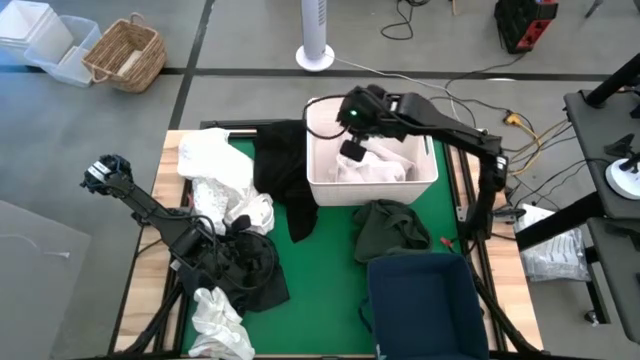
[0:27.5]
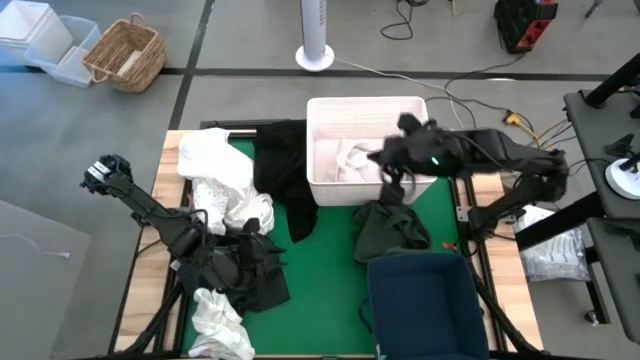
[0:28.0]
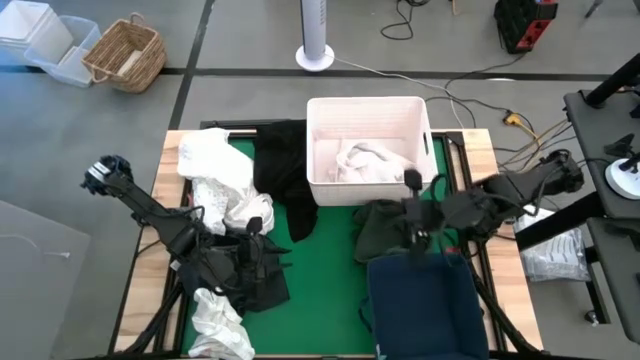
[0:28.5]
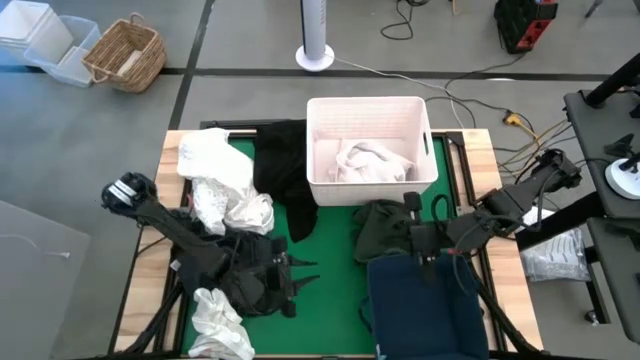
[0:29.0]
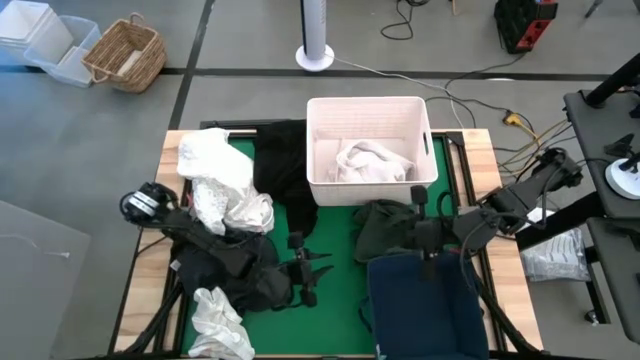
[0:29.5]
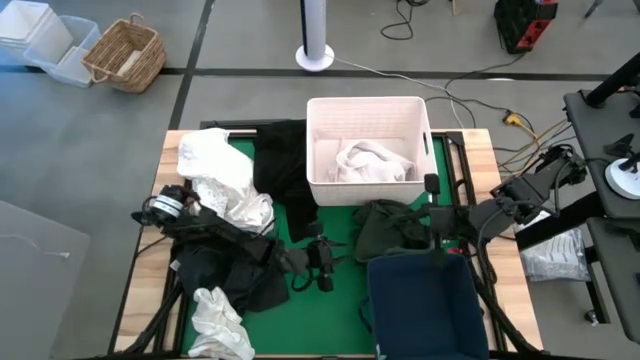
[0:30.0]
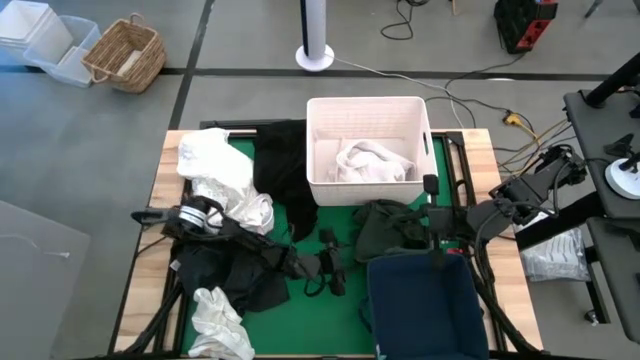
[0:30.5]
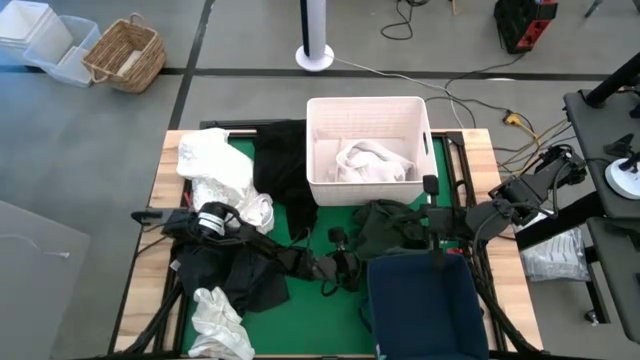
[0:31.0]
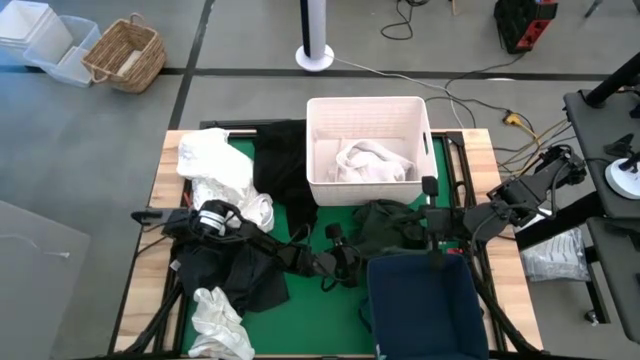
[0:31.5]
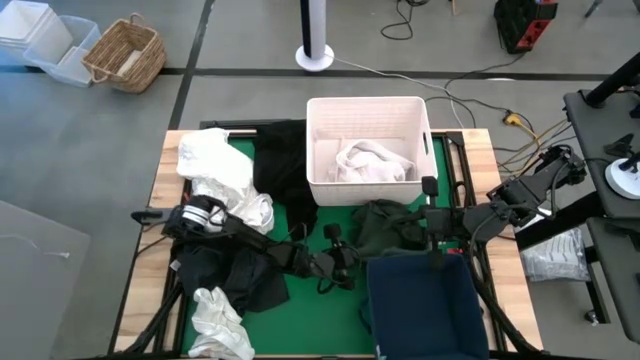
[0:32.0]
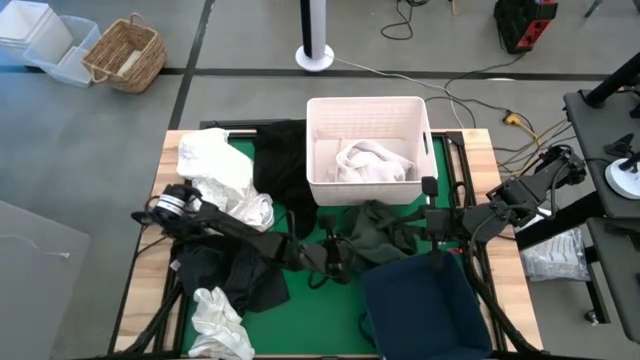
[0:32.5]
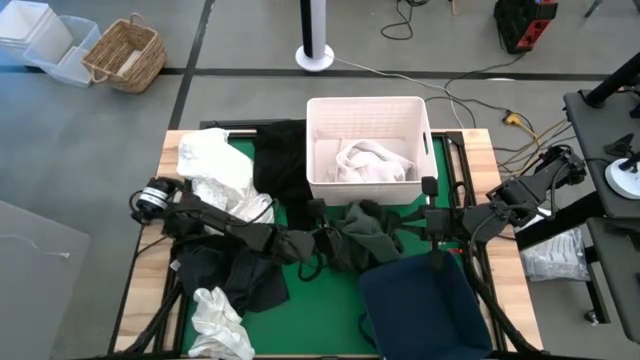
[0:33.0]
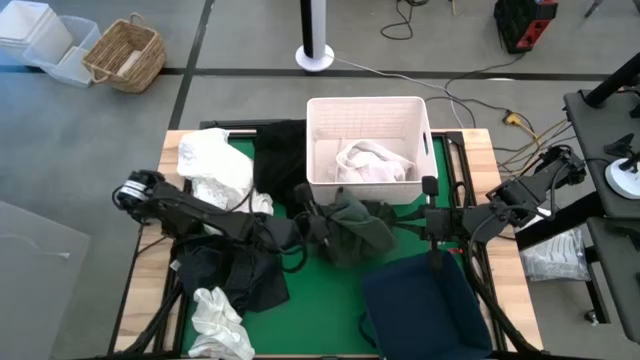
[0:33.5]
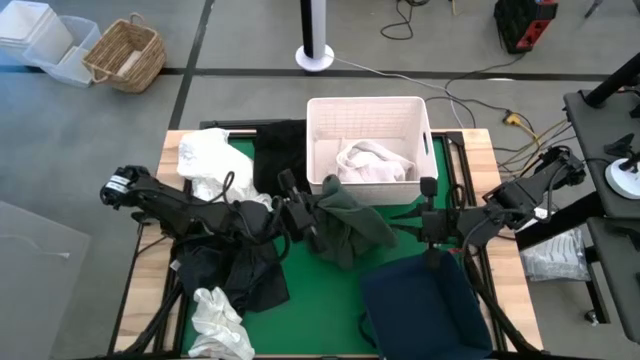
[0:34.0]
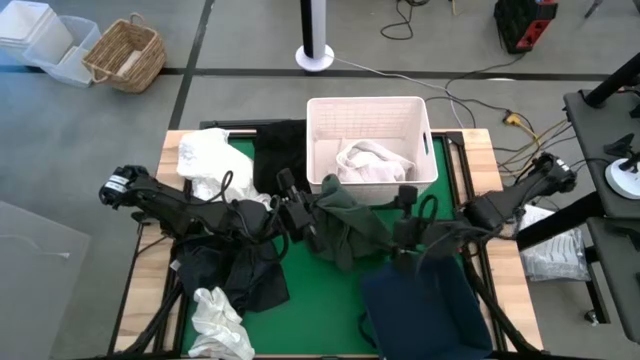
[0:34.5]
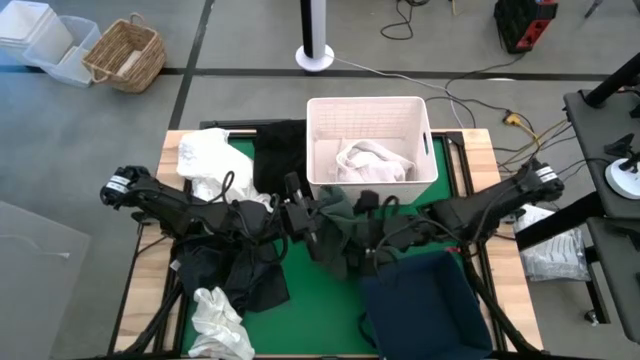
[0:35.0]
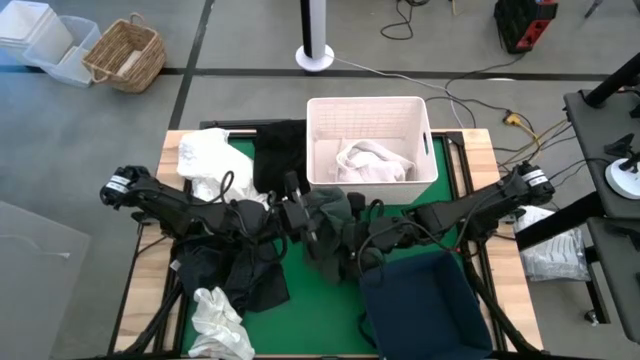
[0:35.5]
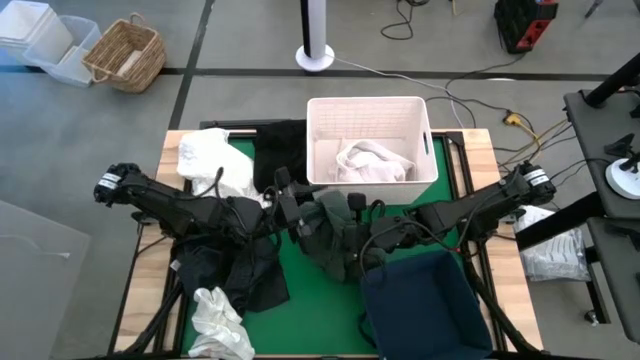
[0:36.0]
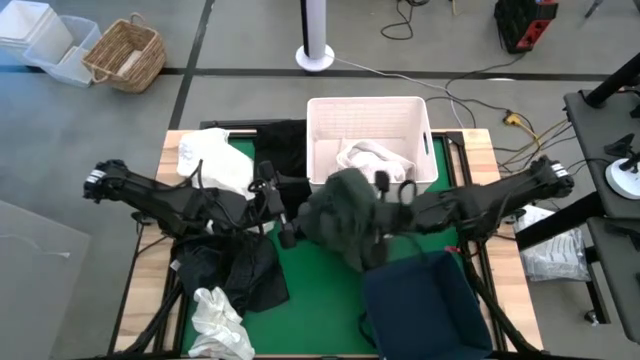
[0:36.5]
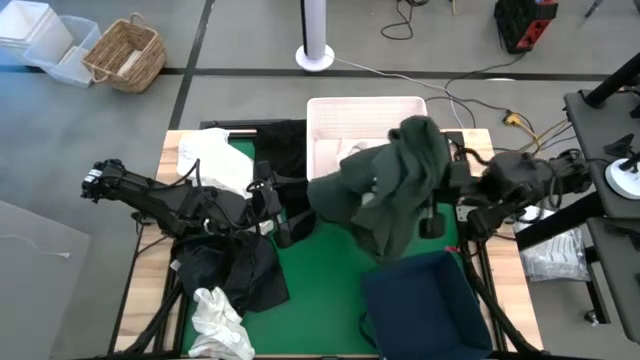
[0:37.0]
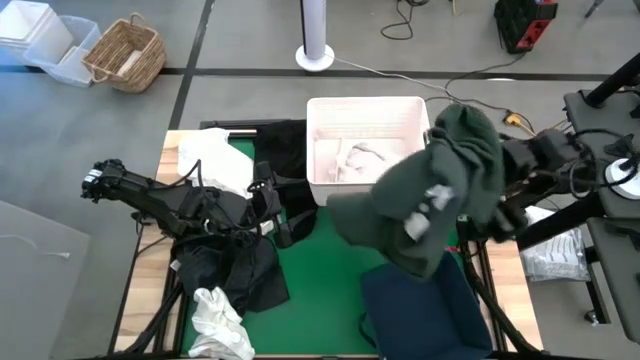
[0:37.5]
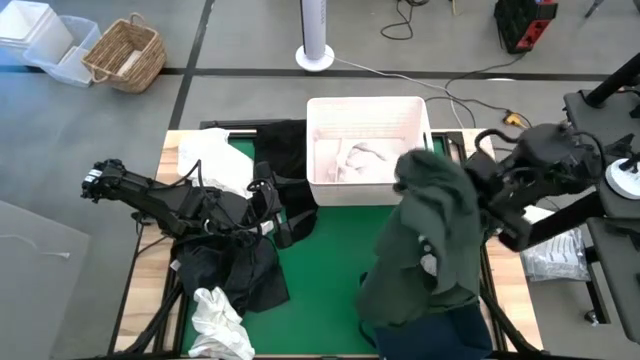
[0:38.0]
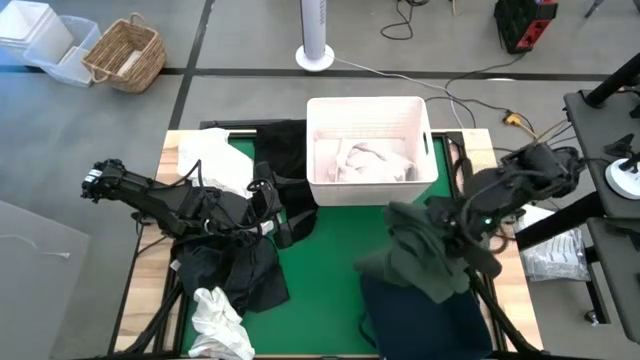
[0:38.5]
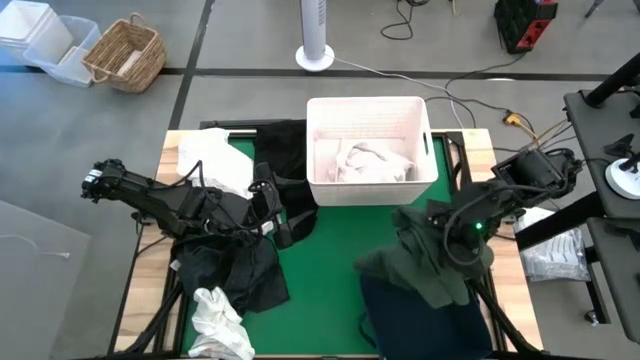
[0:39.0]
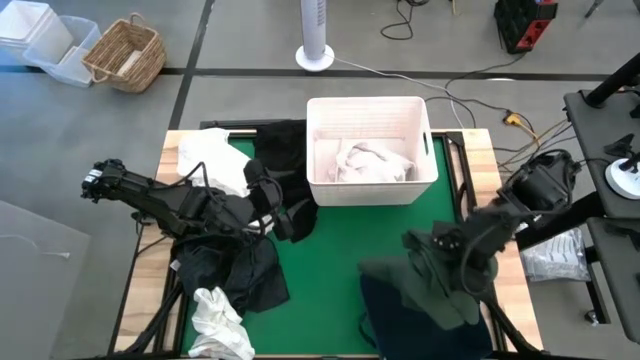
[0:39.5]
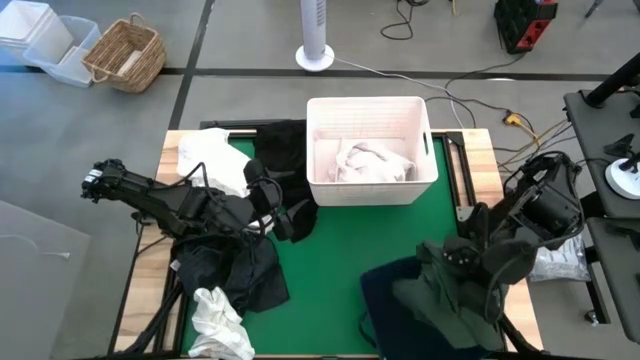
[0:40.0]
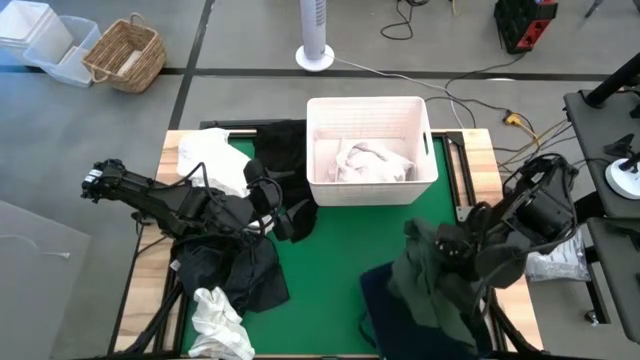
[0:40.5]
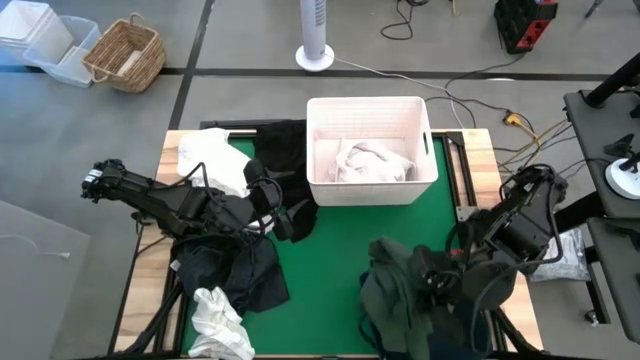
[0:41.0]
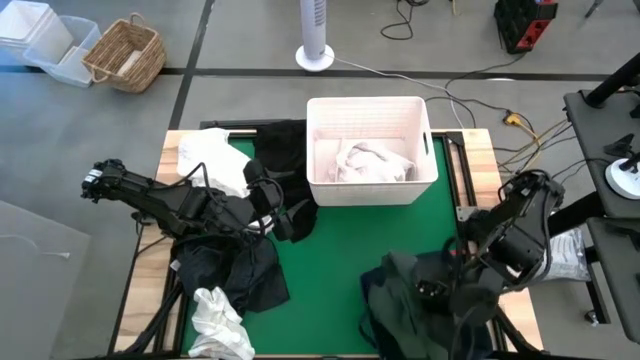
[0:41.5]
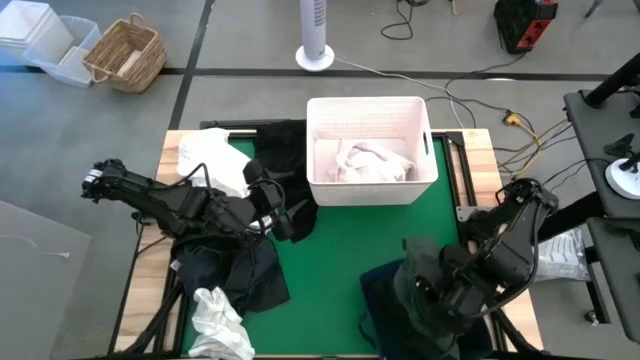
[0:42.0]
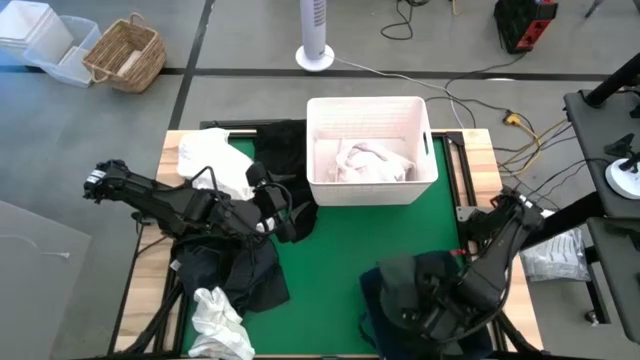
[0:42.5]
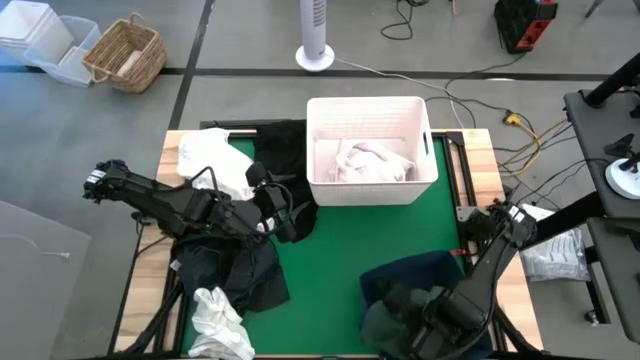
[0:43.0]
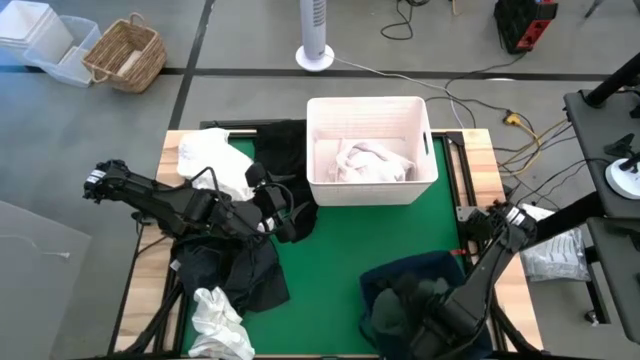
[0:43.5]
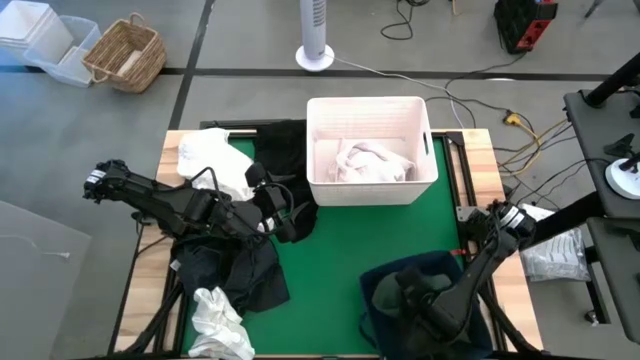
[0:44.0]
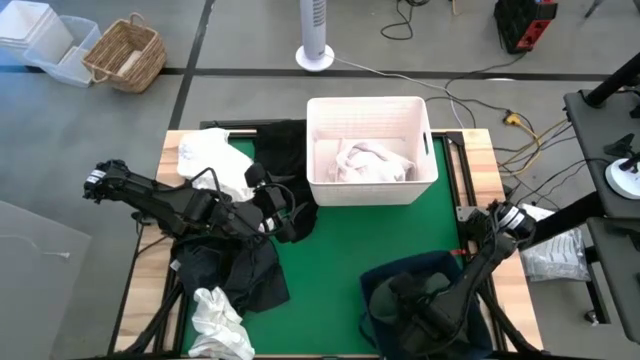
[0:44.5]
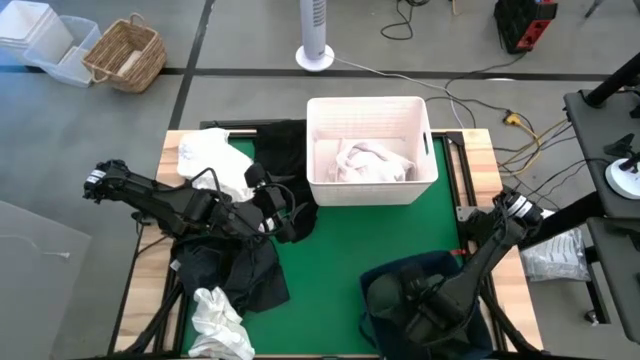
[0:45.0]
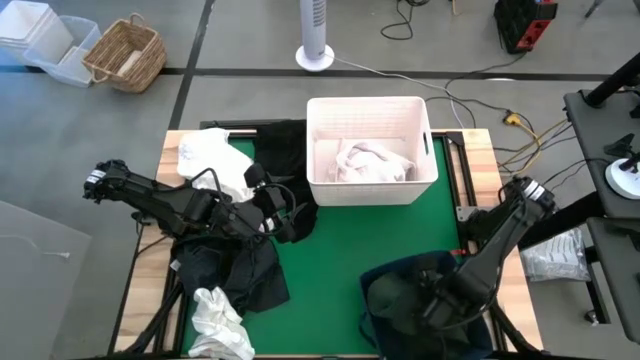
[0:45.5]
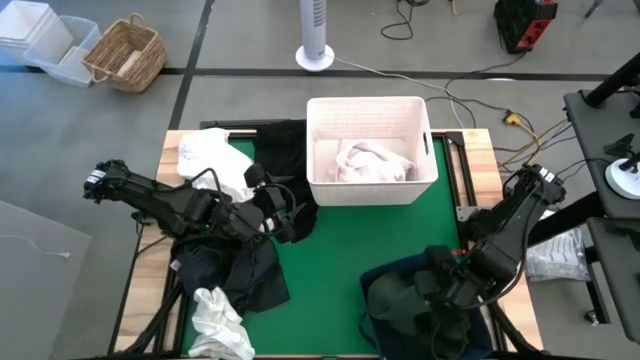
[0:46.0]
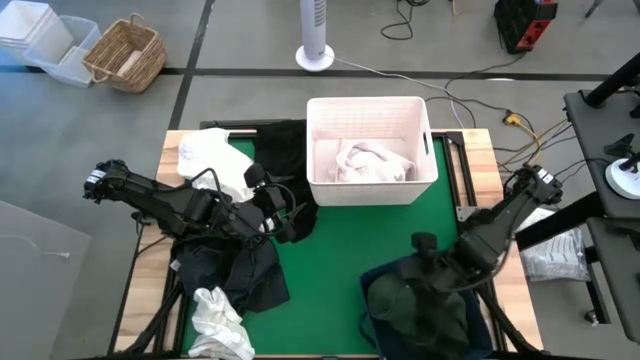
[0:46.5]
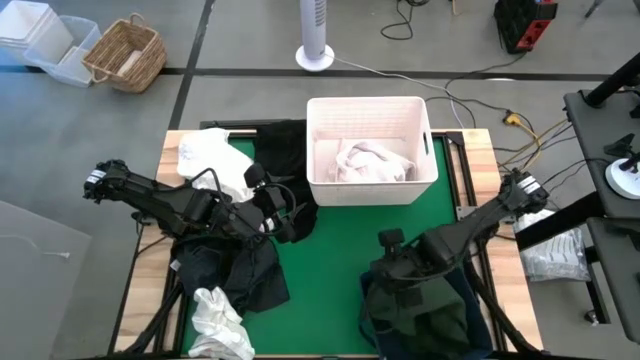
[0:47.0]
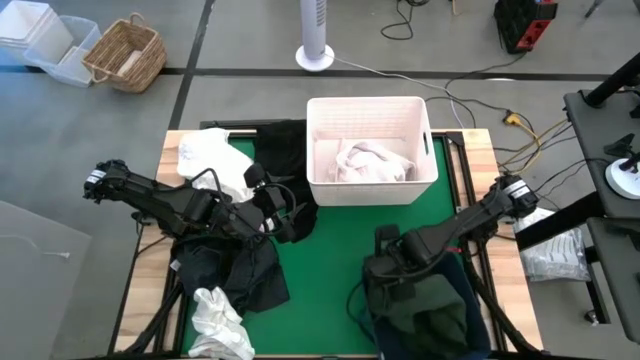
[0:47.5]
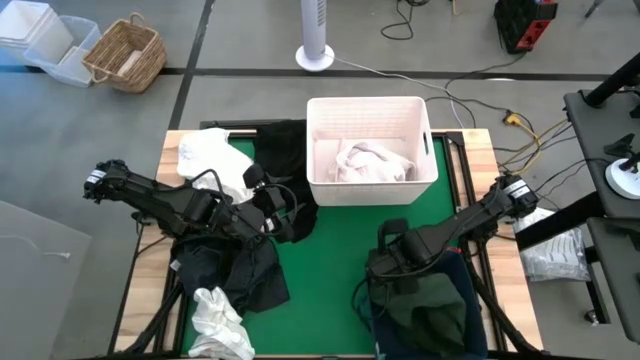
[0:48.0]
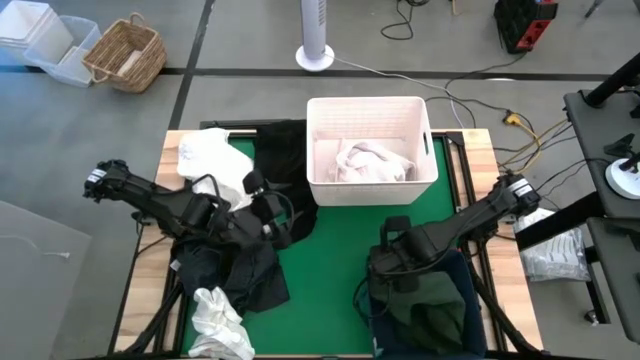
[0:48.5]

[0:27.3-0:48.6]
Put the green long sleeve shirt into the blue laundry bin
